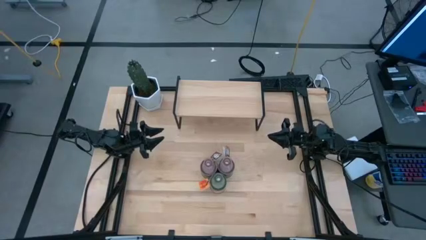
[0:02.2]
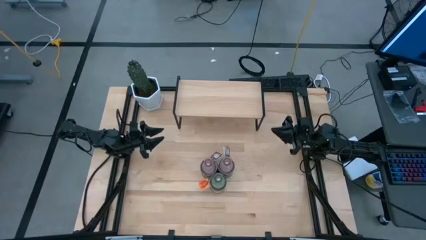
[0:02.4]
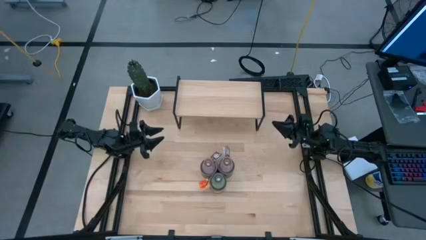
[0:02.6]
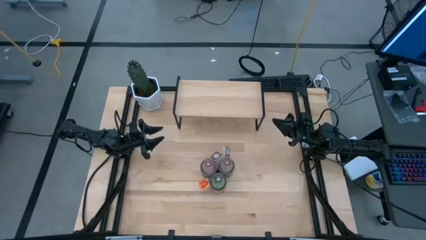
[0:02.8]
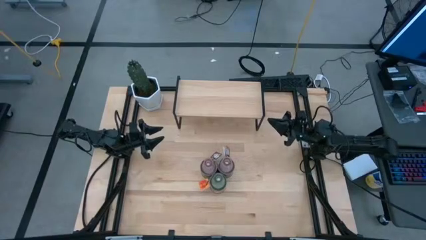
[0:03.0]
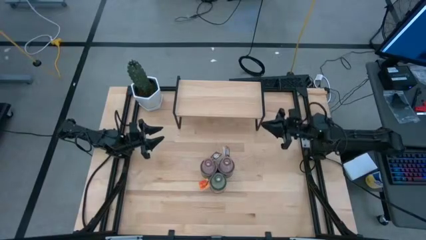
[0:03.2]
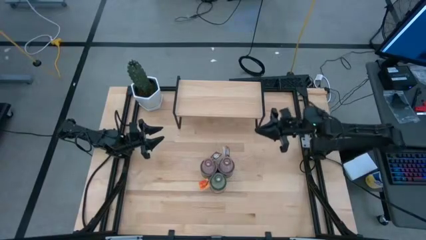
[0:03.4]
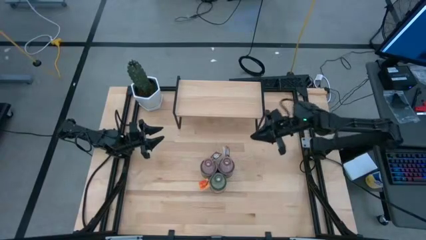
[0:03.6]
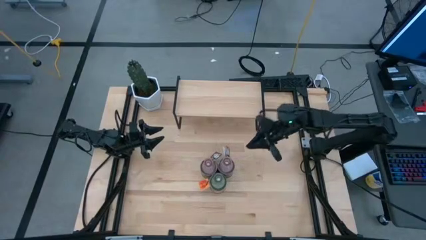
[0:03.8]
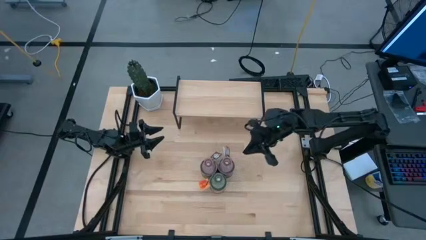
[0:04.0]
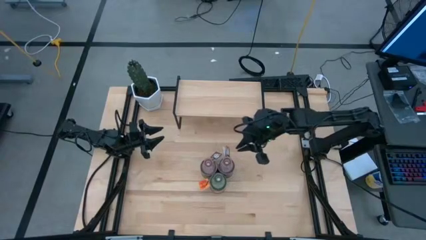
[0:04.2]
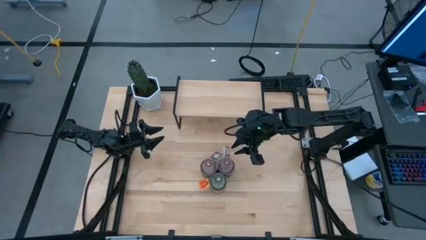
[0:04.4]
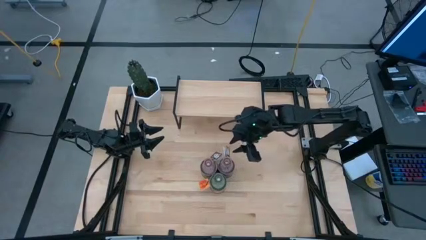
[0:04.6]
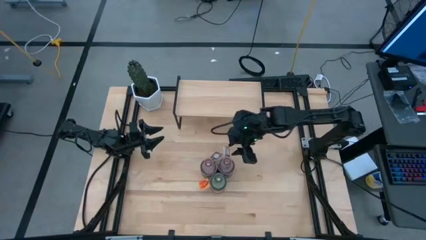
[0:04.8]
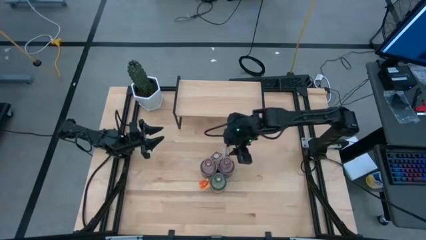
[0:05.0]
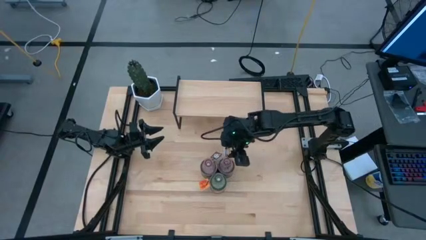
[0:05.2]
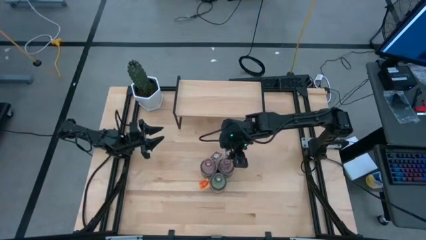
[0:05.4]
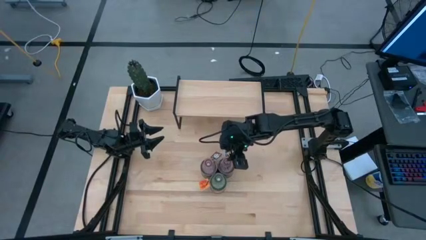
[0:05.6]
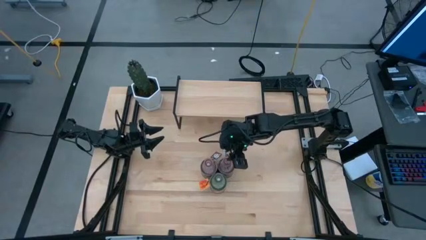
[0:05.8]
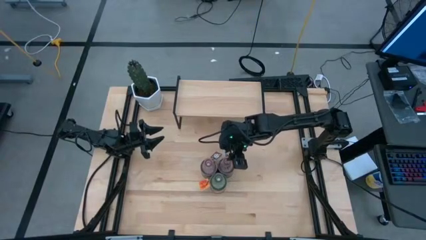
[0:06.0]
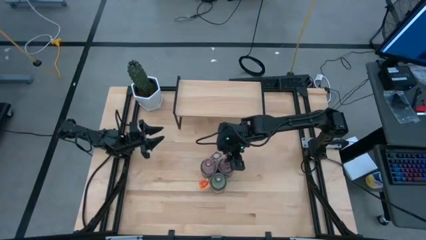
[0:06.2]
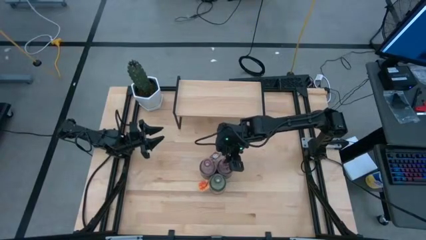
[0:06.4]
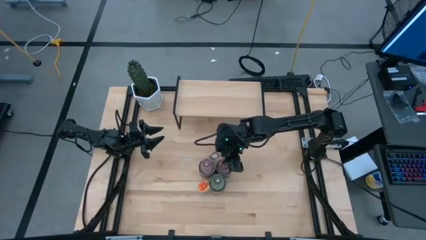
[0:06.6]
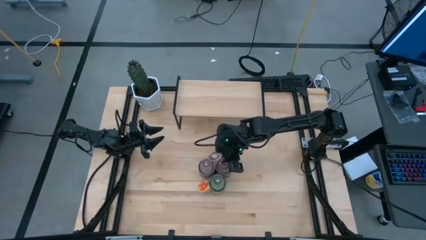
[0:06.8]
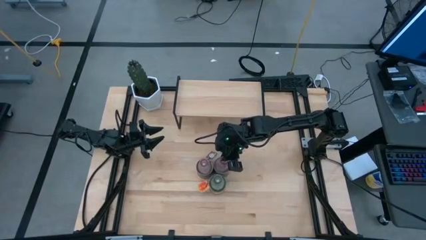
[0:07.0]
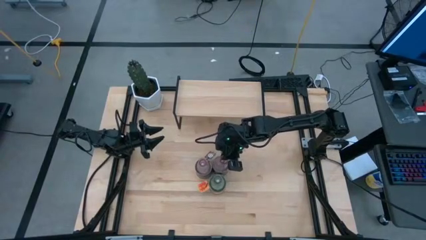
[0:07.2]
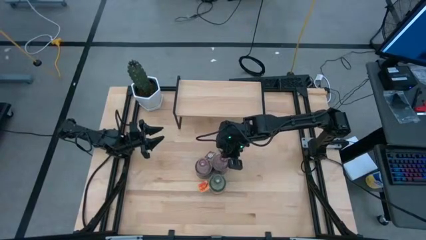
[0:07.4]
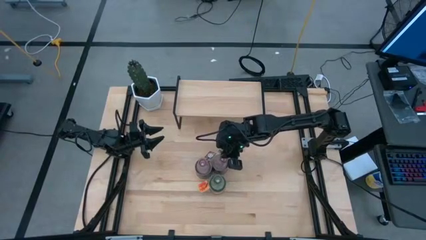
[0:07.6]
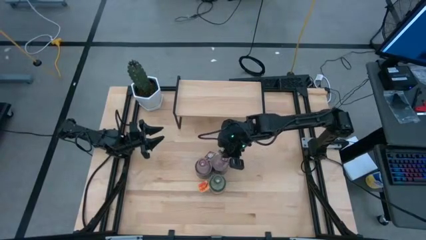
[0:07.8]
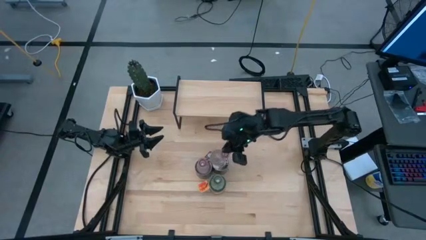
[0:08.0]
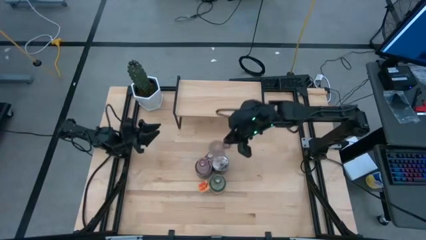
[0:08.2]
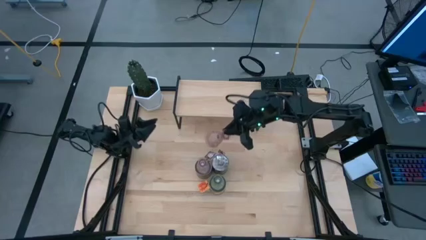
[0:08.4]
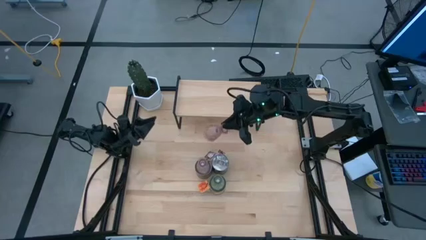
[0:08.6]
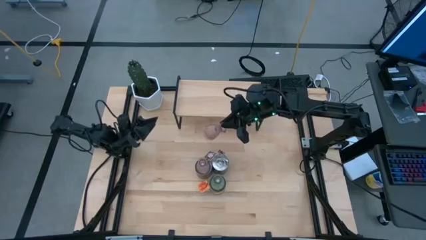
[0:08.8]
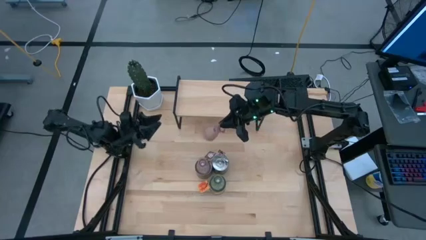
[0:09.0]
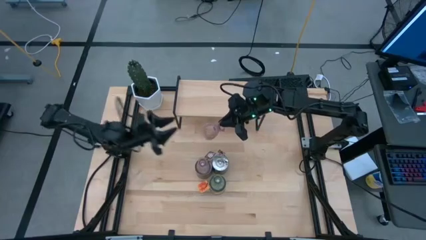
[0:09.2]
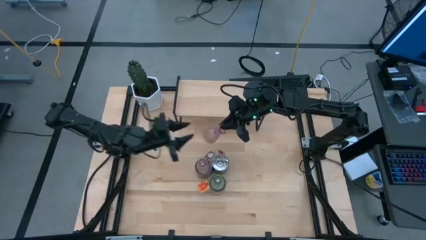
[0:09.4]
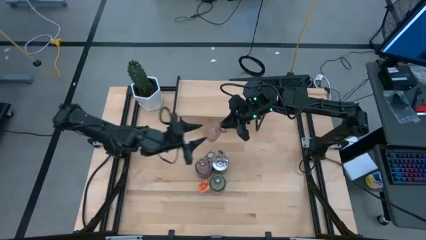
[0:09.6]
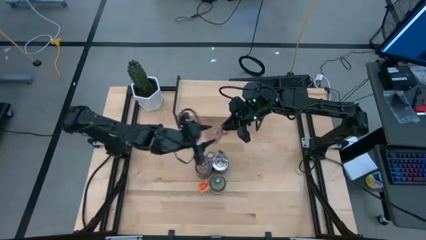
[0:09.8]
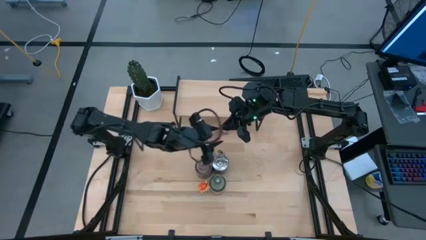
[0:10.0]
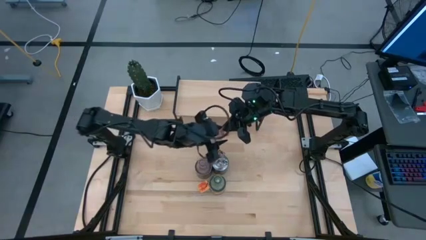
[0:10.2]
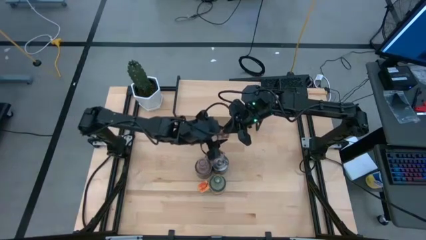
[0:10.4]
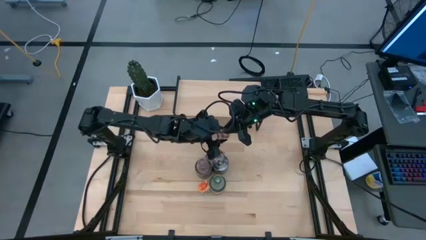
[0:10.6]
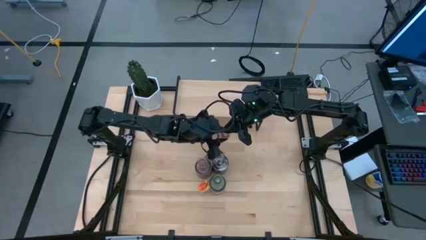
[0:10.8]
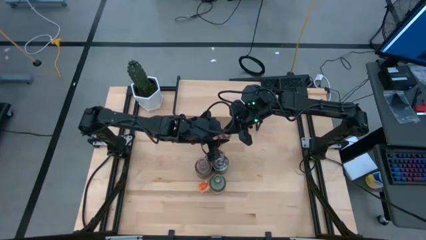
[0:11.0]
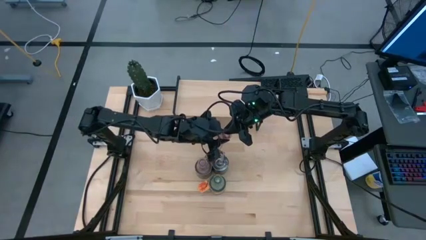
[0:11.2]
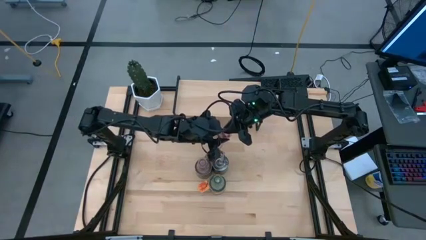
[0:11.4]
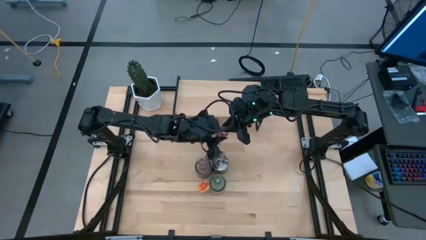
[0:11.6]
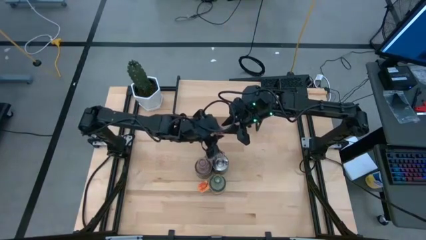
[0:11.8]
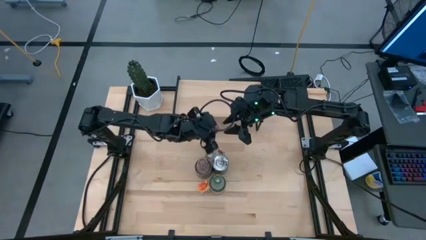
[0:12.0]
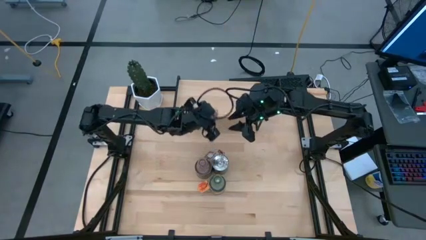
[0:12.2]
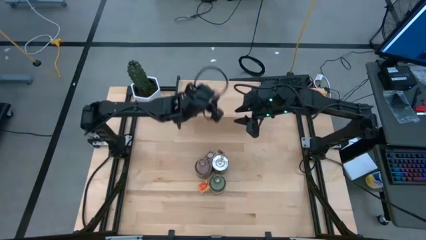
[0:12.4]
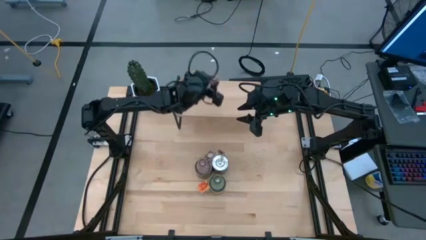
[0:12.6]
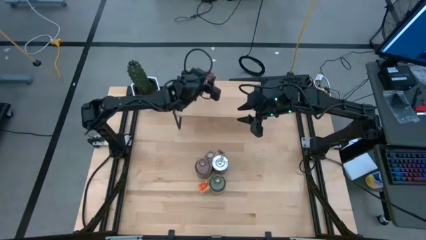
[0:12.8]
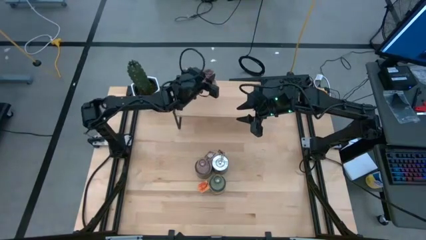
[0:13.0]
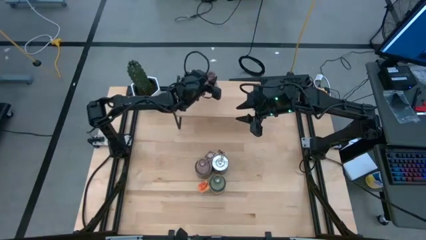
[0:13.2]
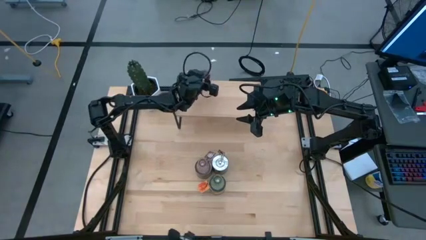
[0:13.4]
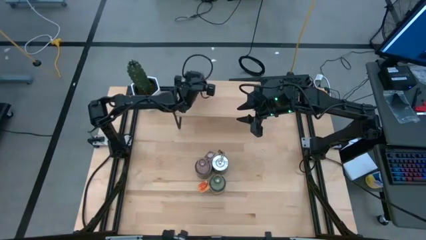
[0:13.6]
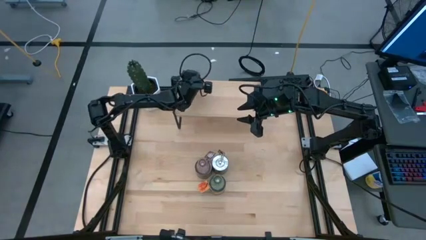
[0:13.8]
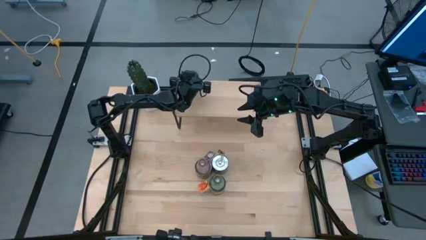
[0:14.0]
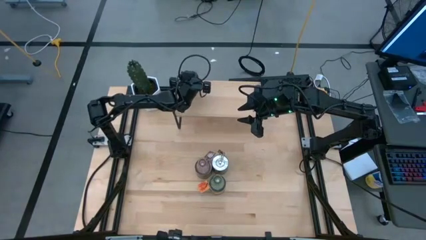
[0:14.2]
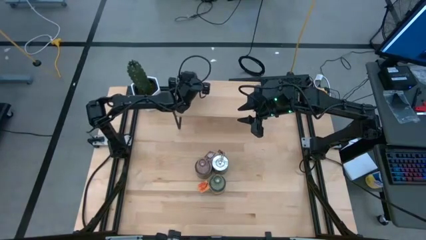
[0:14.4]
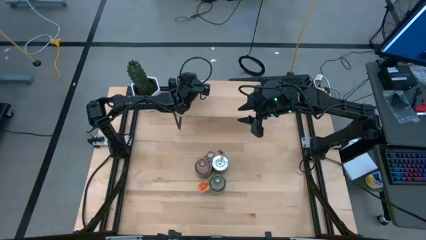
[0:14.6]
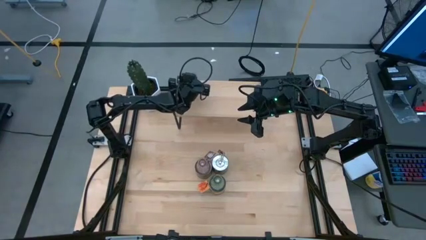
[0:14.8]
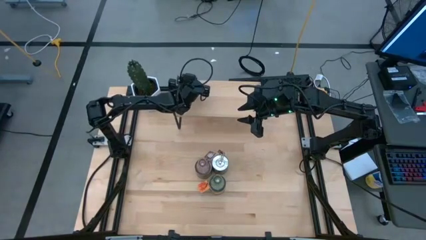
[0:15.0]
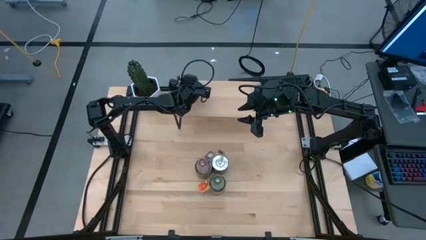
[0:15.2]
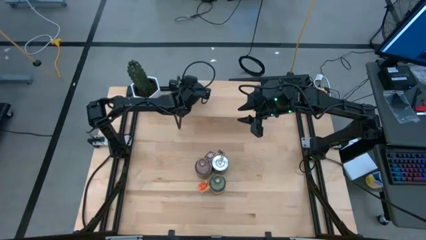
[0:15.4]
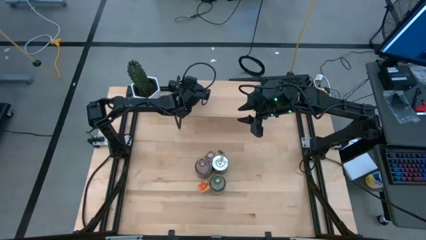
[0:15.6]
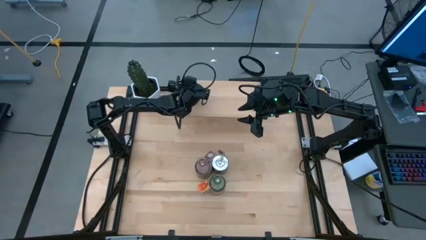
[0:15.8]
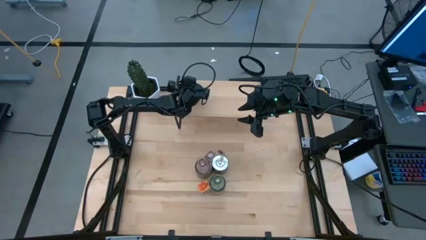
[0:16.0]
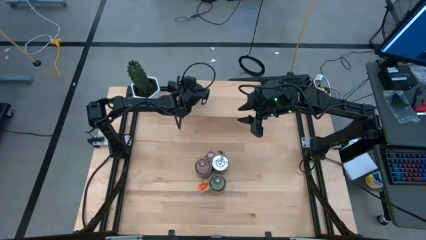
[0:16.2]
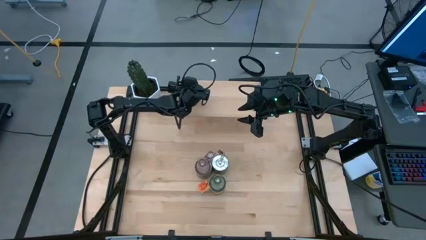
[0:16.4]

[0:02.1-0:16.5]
Task: Pick & Place candle stick holders
Put the right pink glass candle holder on the shelf
